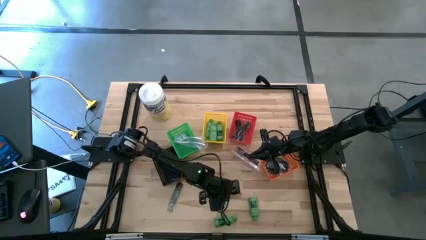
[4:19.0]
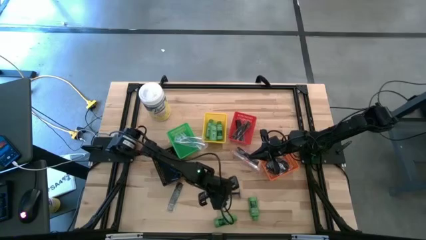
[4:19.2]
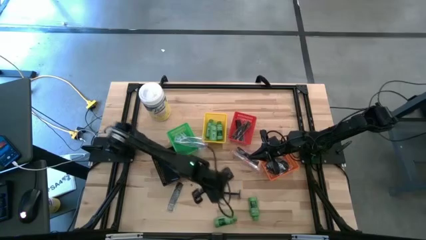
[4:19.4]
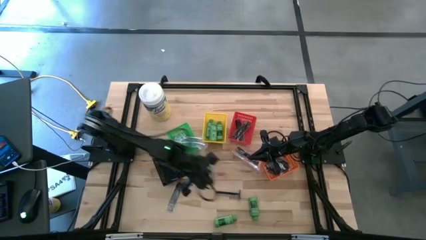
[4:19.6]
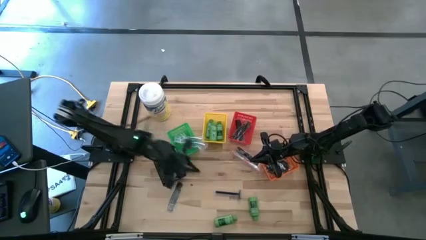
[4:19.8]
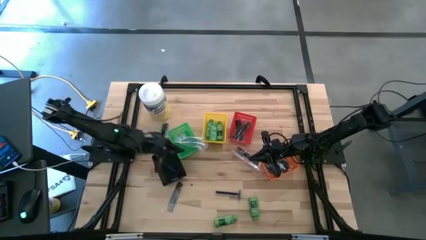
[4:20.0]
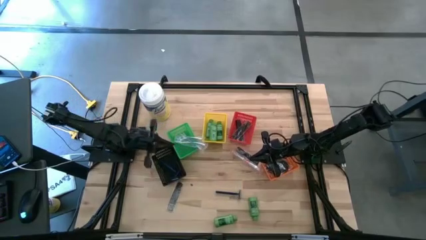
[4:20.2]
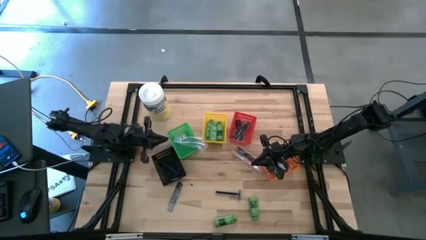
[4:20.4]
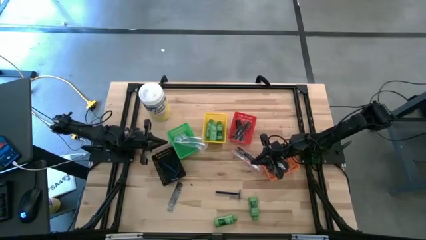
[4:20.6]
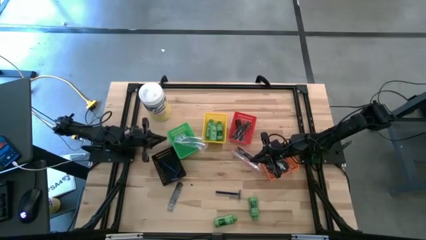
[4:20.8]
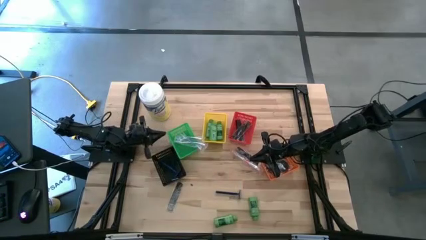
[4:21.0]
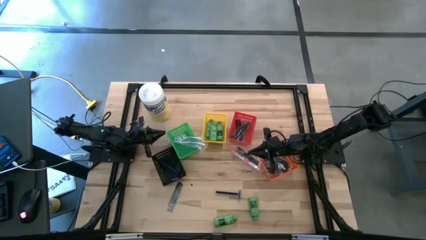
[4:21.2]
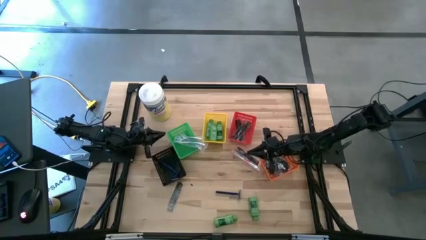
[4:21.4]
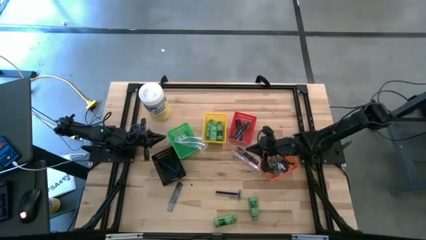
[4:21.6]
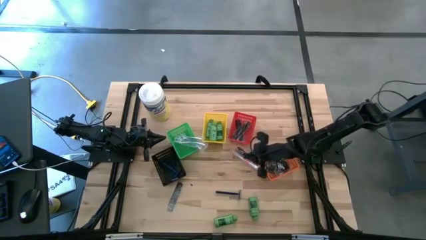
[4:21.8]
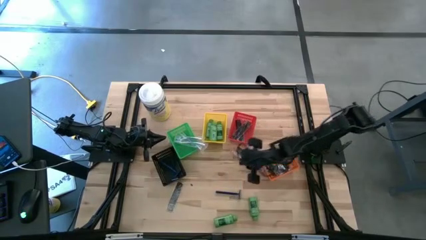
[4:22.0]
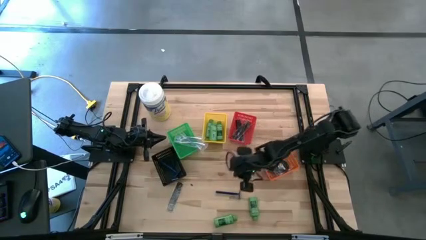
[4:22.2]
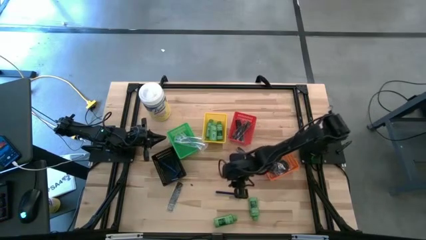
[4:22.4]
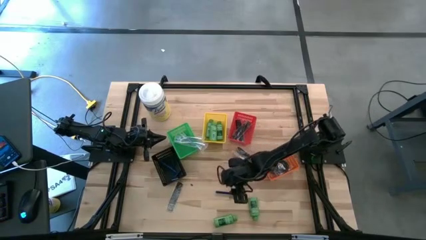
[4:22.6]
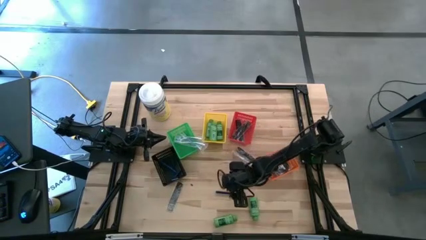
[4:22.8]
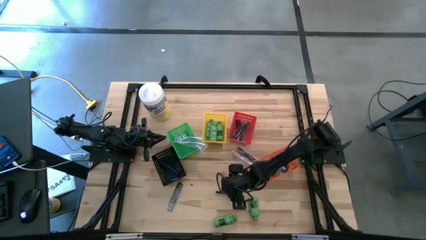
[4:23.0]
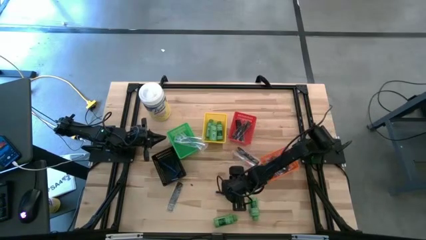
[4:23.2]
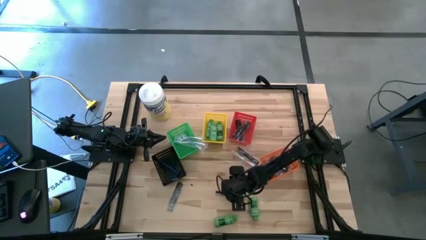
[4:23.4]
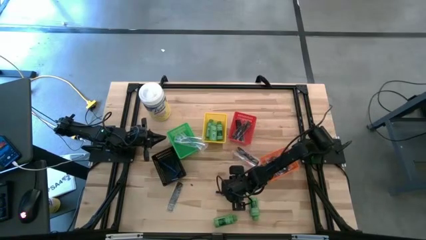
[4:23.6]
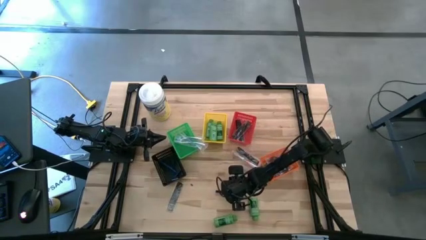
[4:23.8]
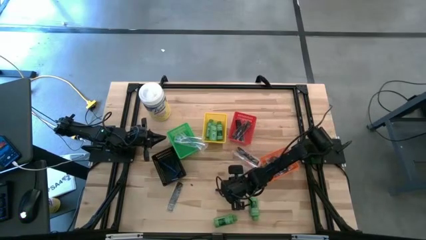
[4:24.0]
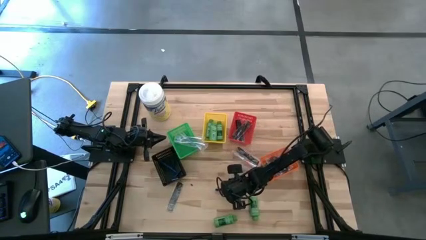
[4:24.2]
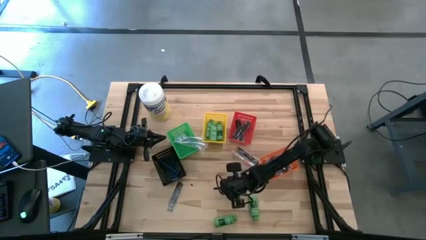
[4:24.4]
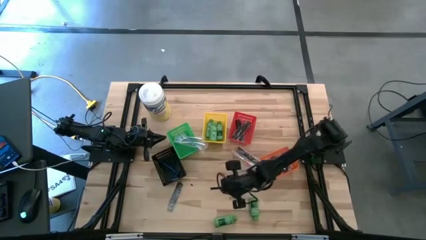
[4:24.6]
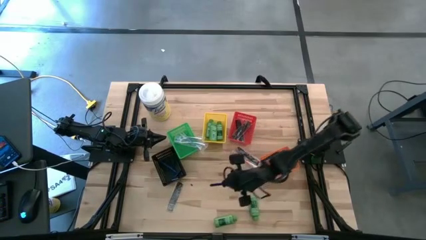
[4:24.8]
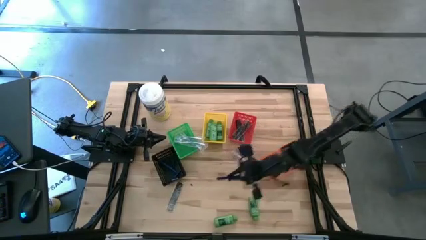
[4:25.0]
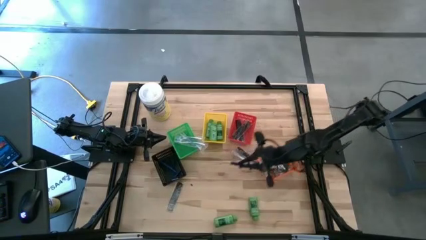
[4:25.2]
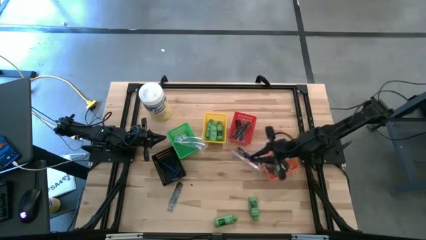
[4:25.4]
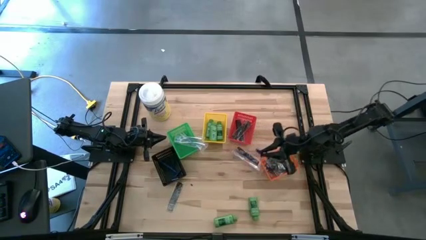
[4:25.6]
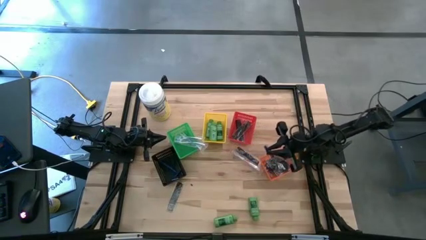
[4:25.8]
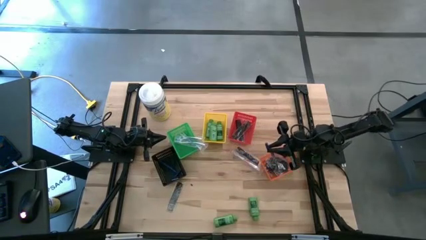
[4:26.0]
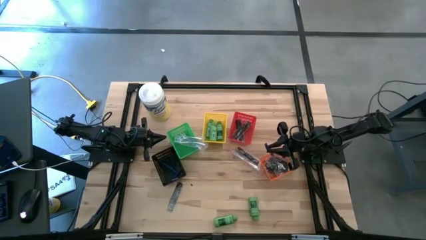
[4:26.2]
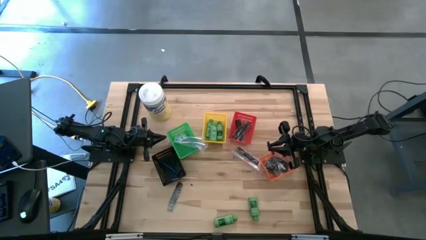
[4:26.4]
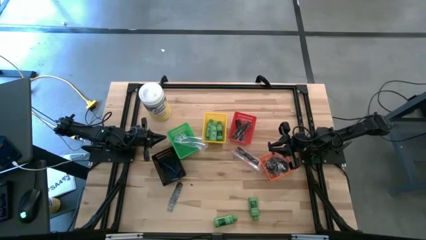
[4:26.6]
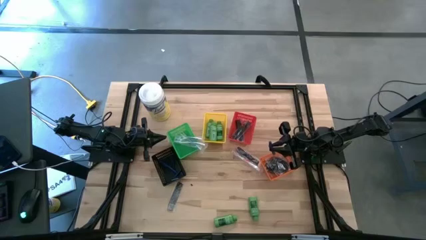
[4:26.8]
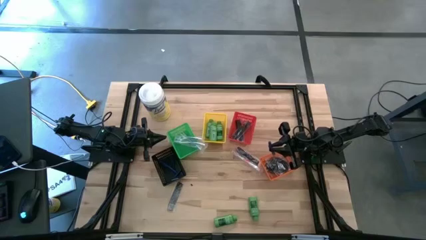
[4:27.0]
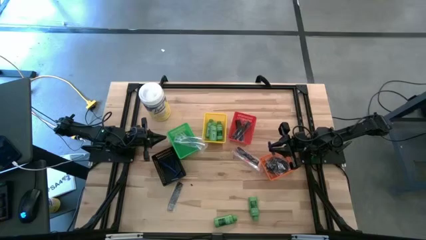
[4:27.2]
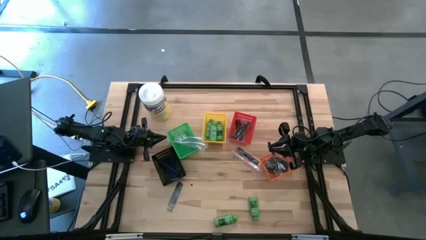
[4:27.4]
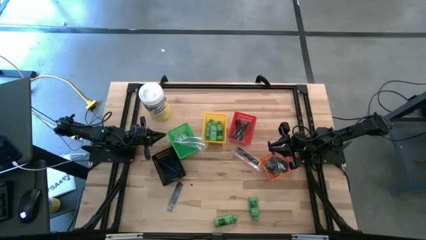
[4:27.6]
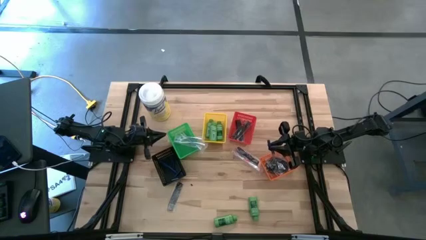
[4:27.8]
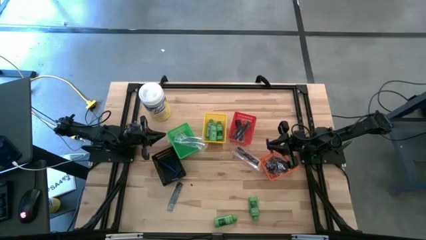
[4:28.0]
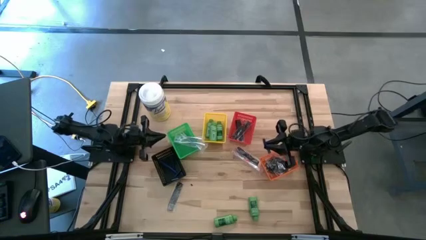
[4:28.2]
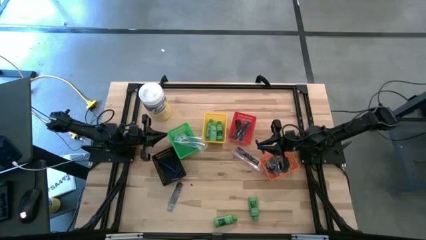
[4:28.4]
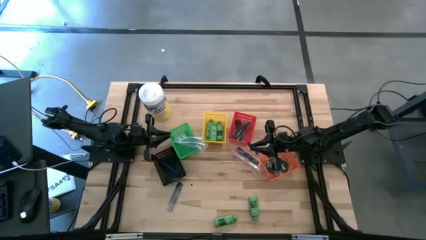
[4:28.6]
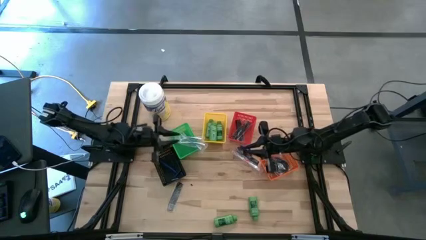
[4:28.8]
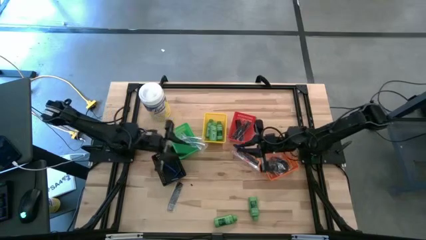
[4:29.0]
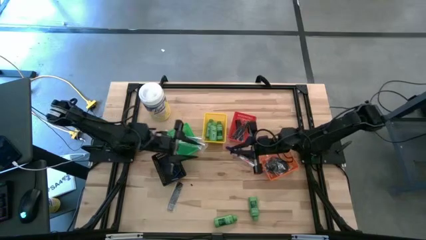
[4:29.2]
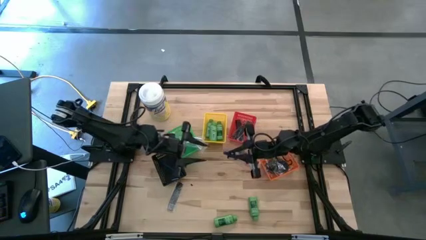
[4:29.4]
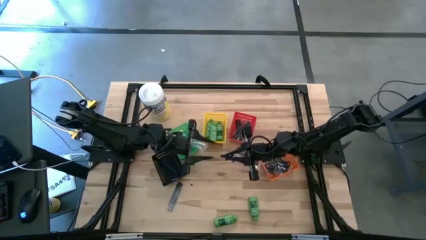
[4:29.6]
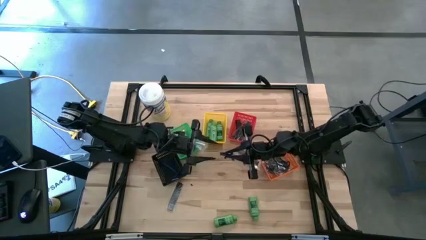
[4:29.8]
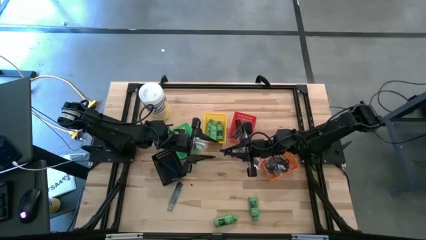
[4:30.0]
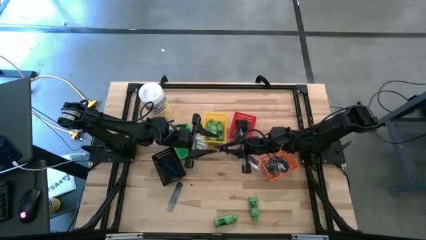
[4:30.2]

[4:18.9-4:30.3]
Task: Pick & Place Travel size toiletries
Put the blue razor into the black bin
